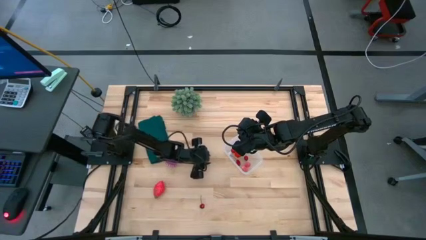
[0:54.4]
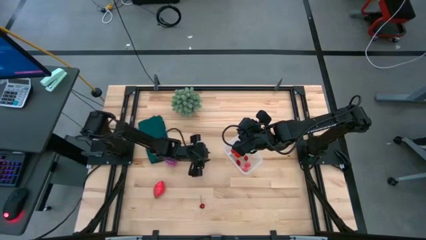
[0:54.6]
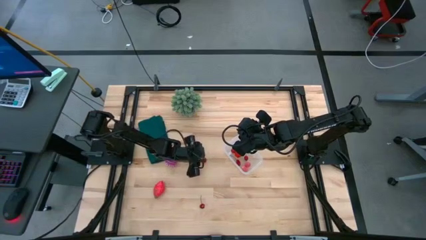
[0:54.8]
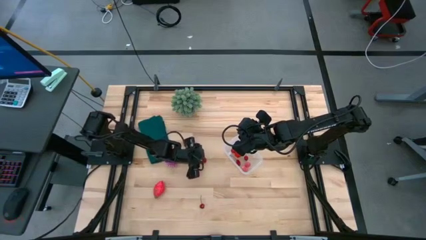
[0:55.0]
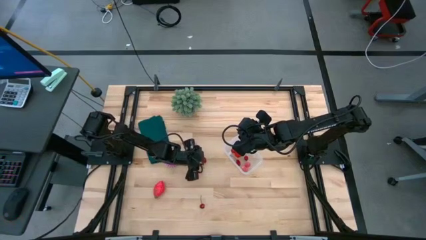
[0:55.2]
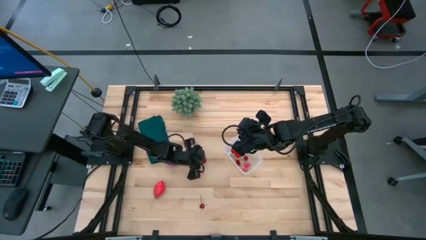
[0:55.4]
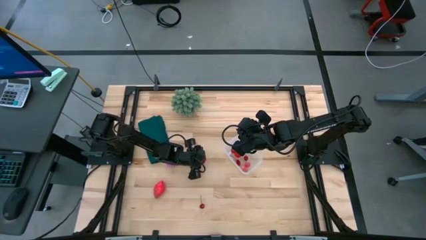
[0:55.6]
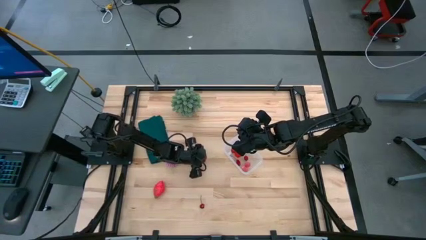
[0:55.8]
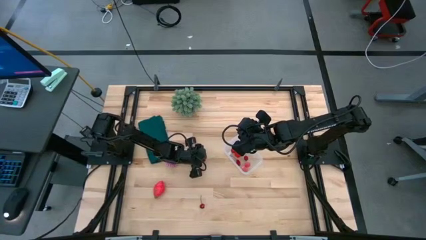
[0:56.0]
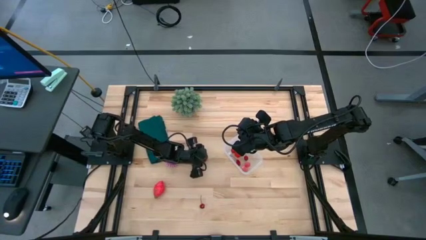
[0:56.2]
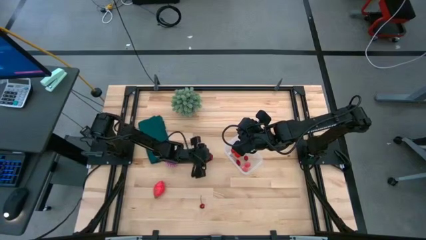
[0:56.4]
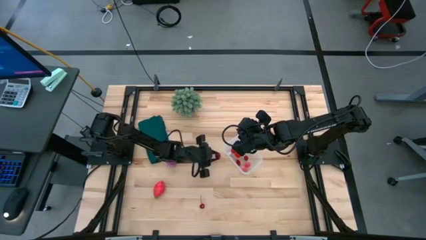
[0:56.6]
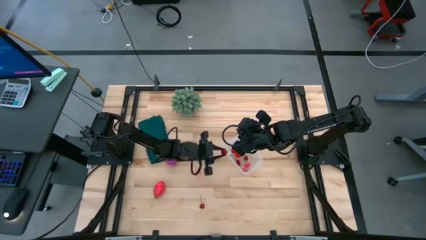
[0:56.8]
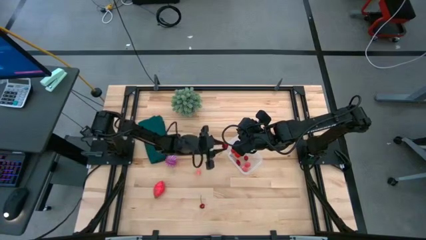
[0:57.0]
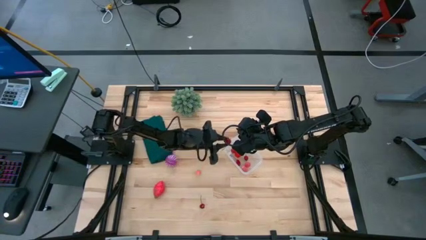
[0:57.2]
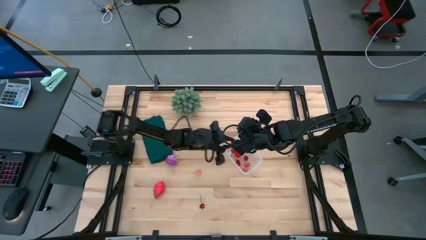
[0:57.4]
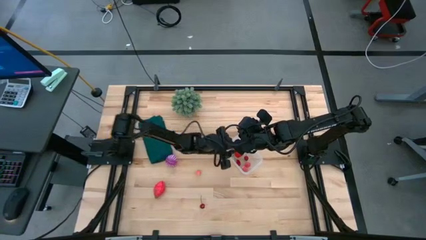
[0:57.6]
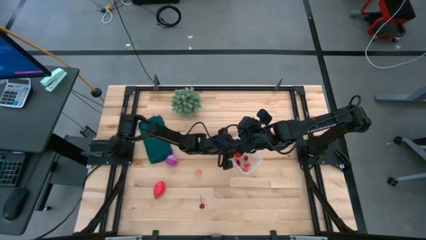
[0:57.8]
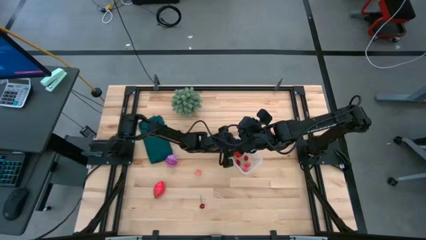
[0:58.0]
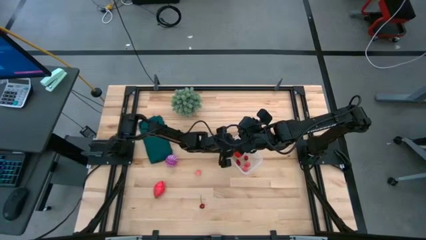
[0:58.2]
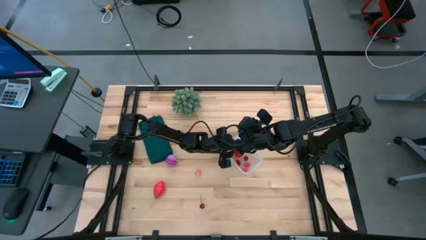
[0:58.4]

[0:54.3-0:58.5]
Task: Pick and placing Produce into tupperware
Put the cherry into the transparent bin

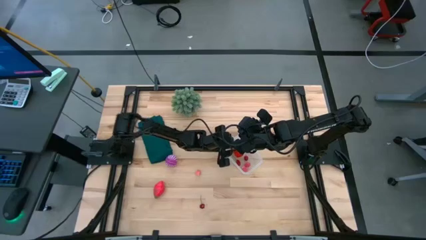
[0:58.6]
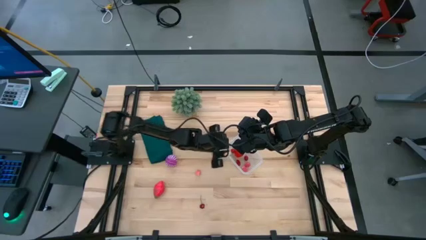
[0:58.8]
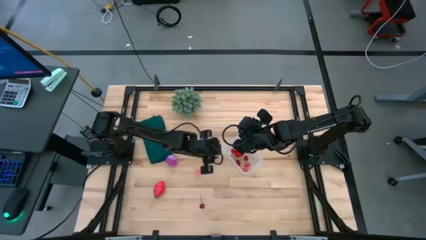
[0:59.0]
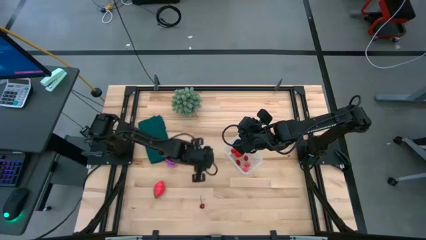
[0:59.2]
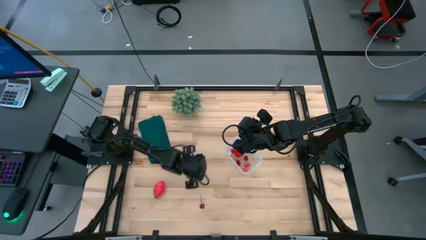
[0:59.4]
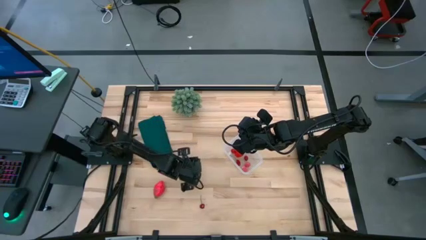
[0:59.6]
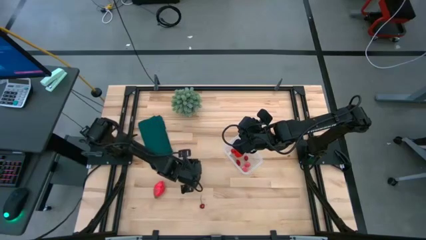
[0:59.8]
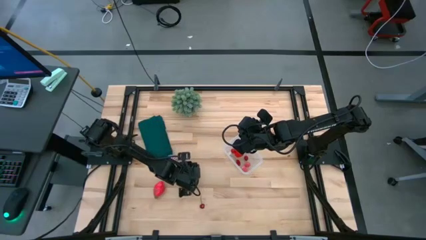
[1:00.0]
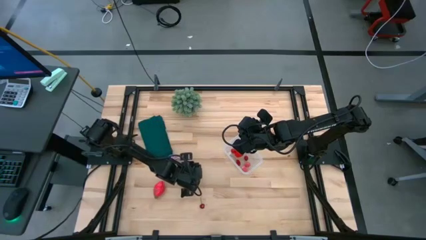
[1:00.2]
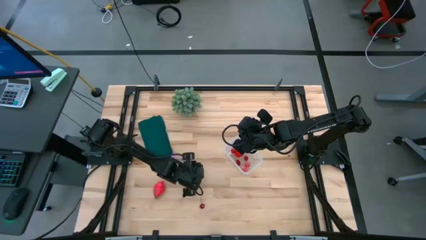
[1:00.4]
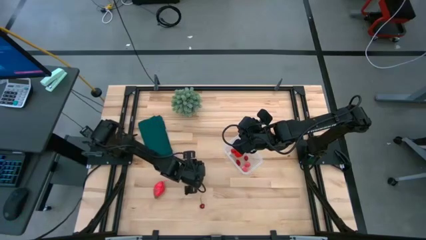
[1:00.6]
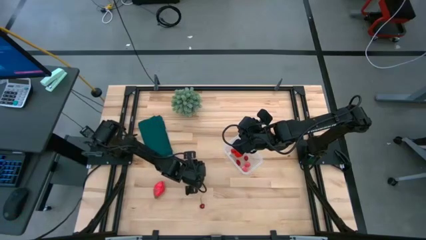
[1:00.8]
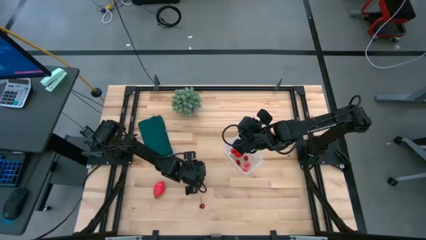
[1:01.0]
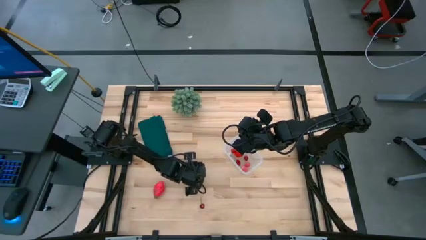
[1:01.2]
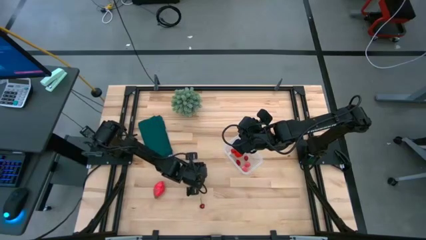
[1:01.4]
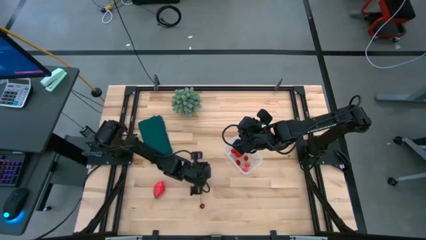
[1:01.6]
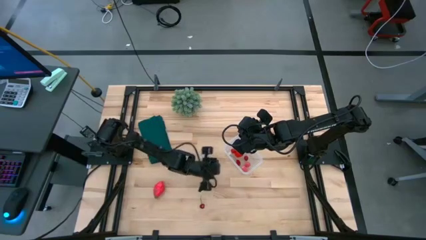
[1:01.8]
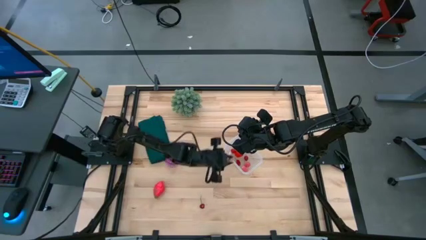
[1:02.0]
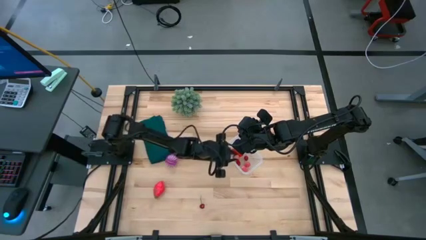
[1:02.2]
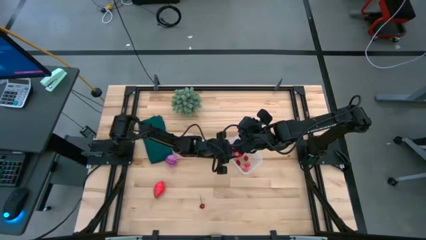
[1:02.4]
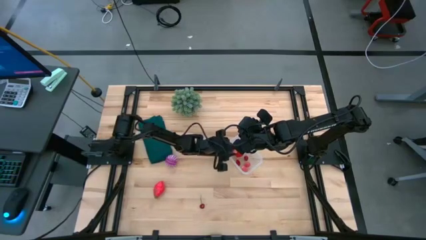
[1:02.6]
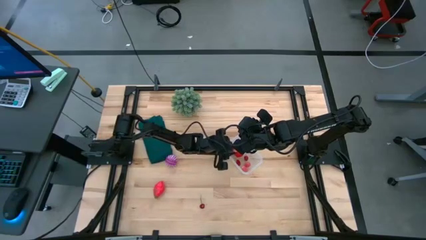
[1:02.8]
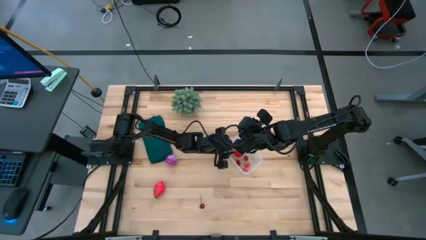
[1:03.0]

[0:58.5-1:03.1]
Put the peach into the transparent bin

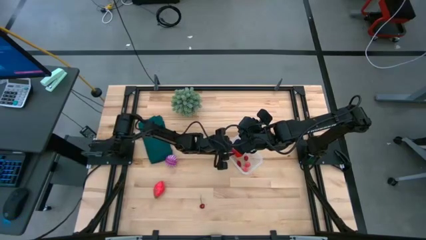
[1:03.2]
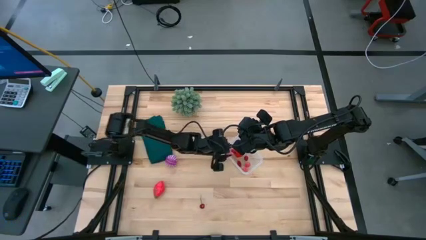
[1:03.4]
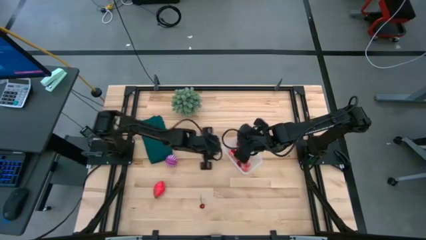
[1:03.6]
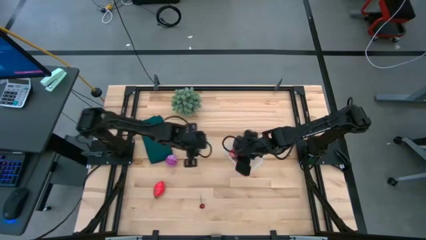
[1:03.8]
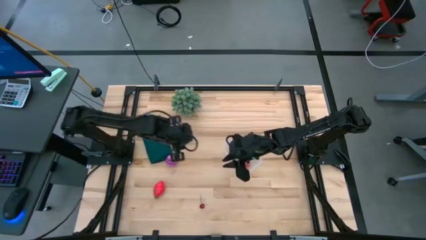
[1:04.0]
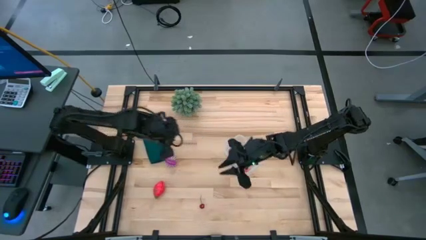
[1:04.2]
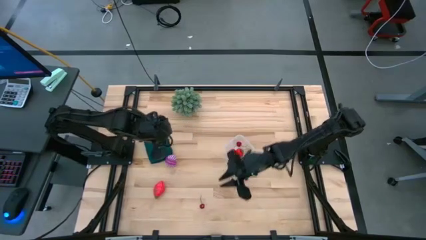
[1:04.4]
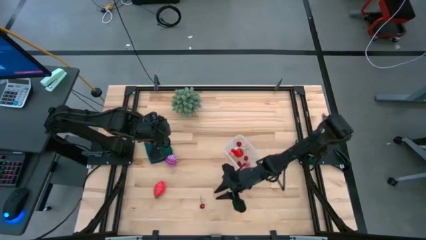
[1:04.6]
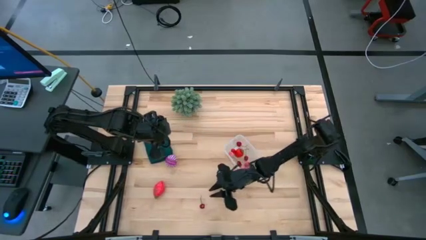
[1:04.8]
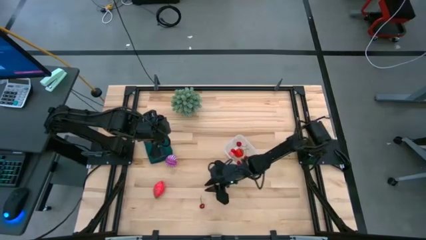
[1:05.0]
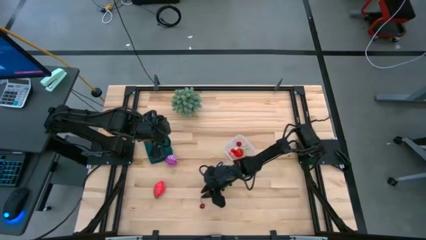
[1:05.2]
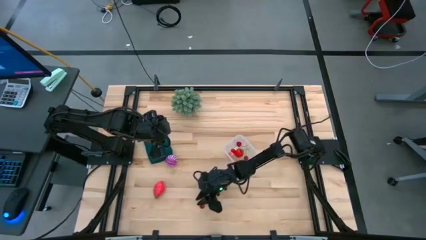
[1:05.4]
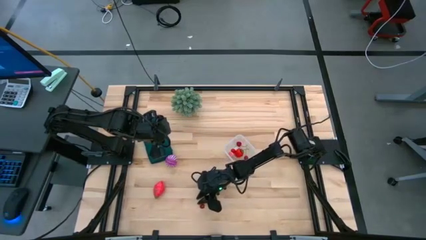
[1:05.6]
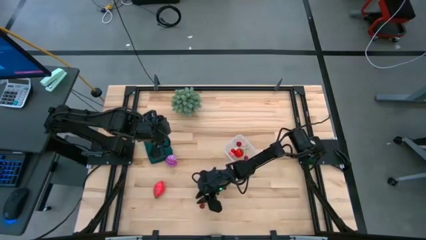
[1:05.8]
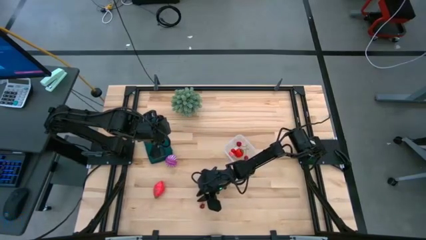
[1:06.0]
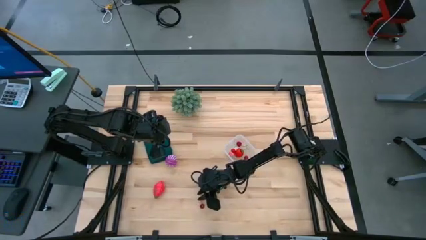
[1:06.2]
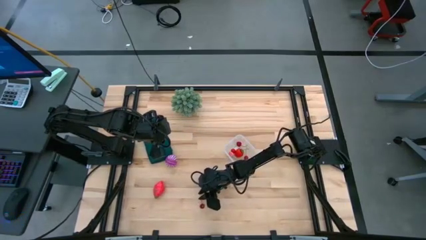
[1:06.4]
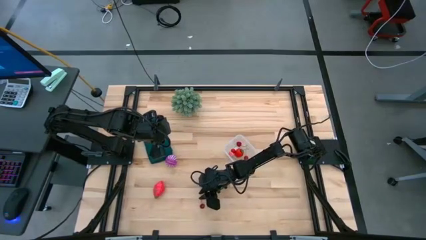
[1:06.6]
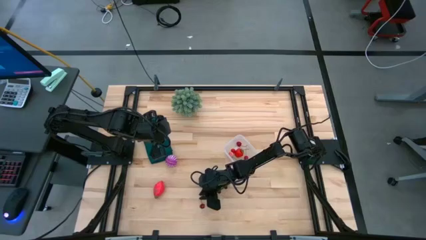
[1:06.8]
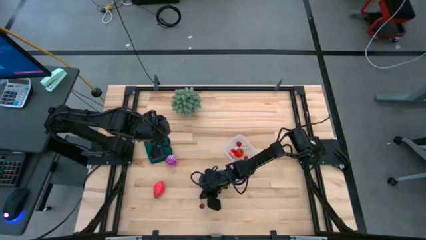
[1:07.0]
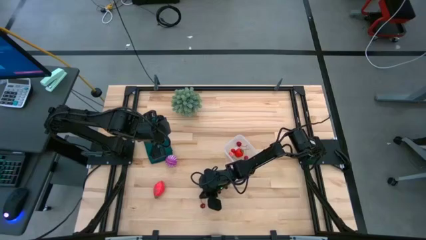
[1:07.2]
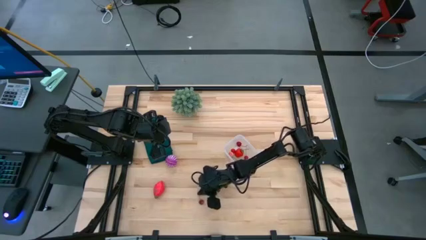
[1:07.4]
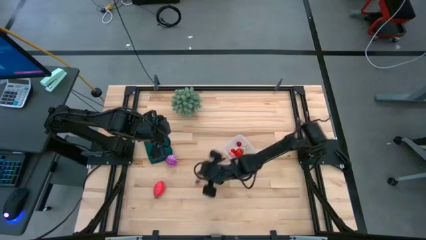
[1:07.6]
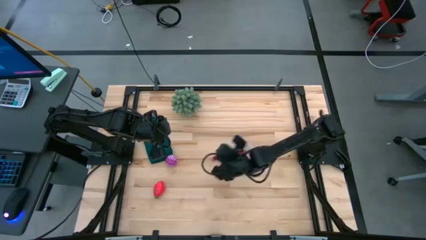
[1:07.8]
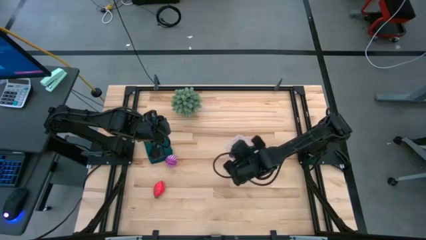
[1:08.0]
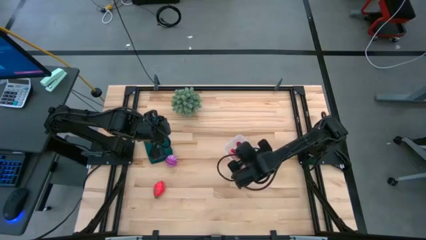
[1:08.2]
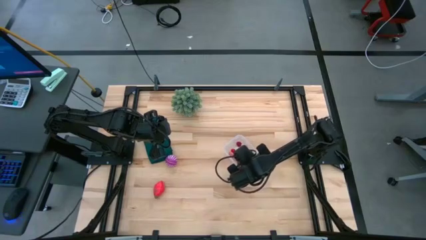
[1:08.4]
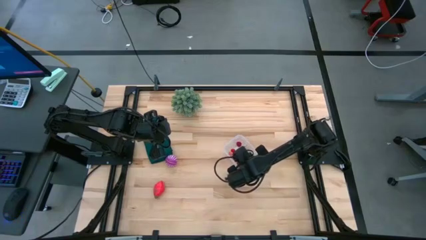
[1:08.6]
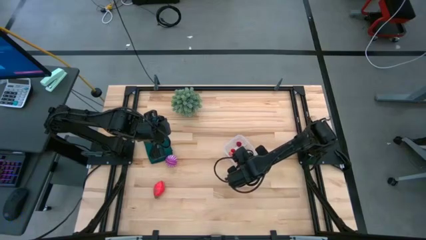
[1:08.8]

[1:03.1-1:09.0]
Put the cherry into the transparent bin
